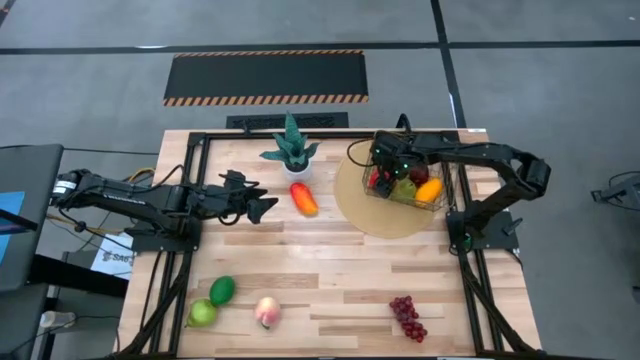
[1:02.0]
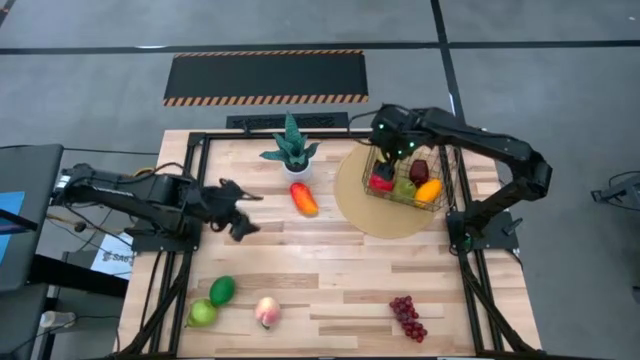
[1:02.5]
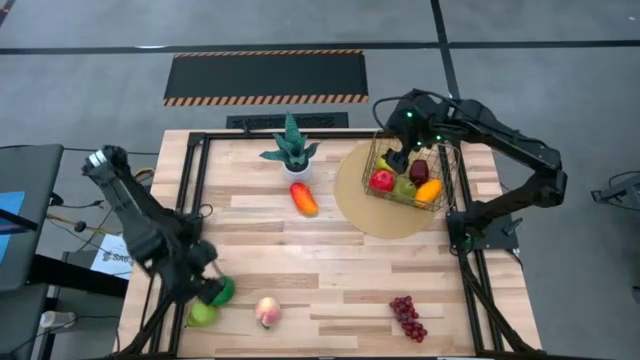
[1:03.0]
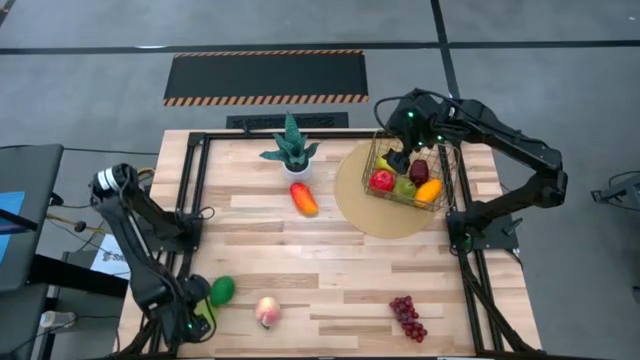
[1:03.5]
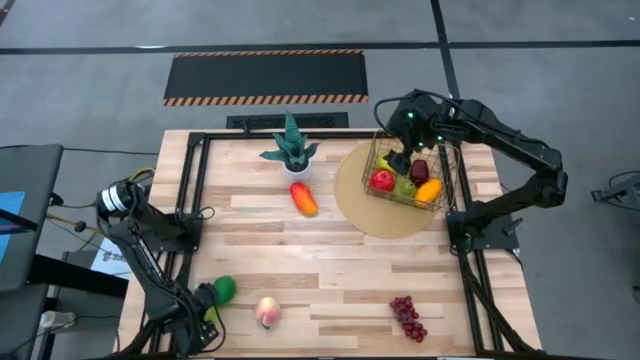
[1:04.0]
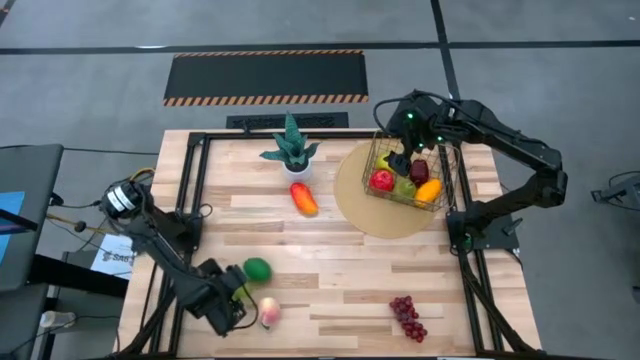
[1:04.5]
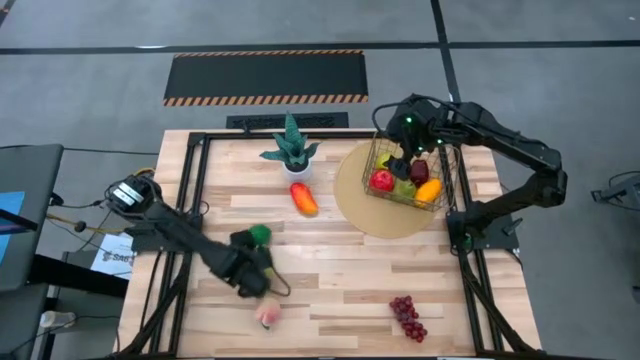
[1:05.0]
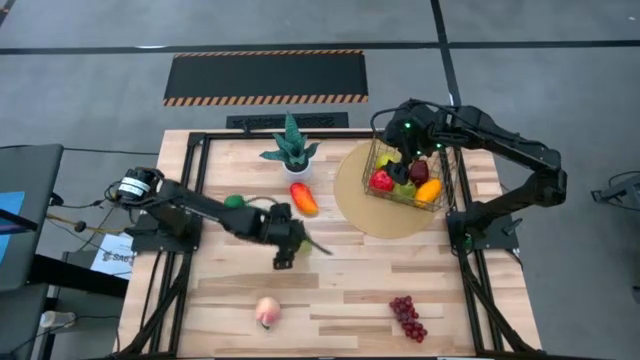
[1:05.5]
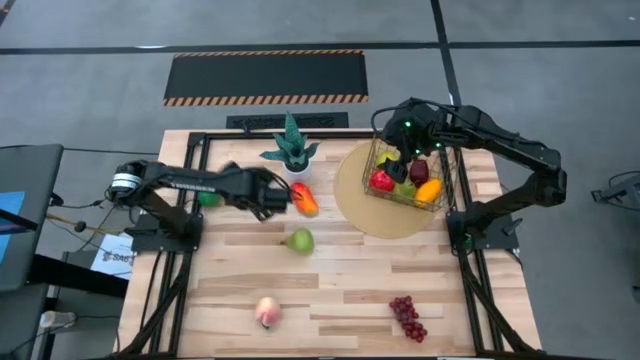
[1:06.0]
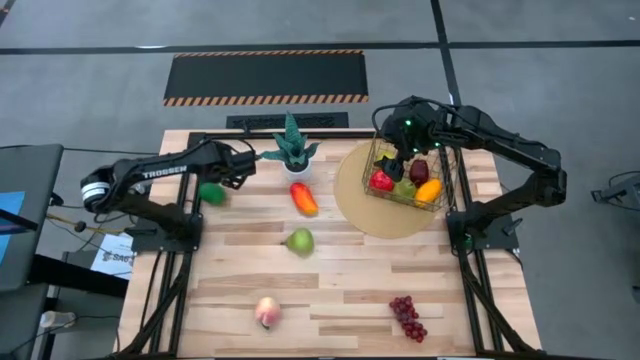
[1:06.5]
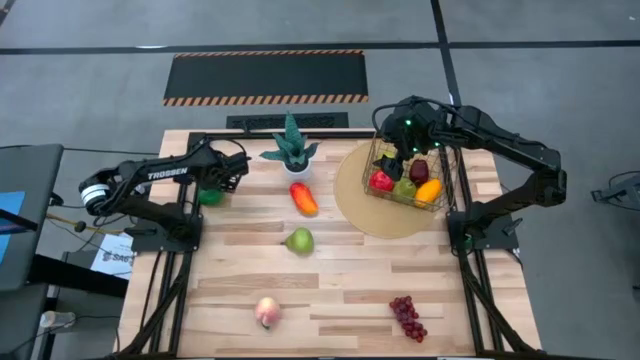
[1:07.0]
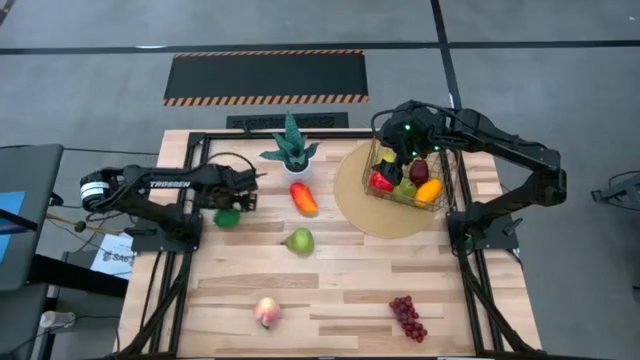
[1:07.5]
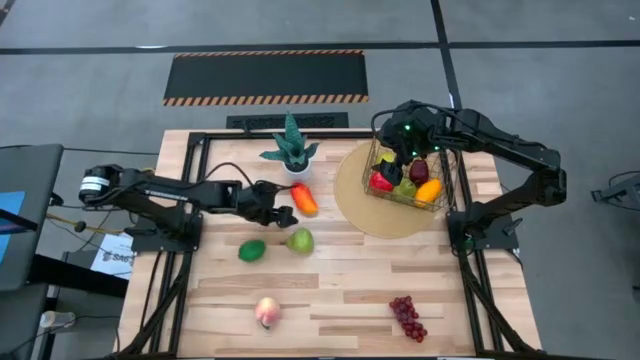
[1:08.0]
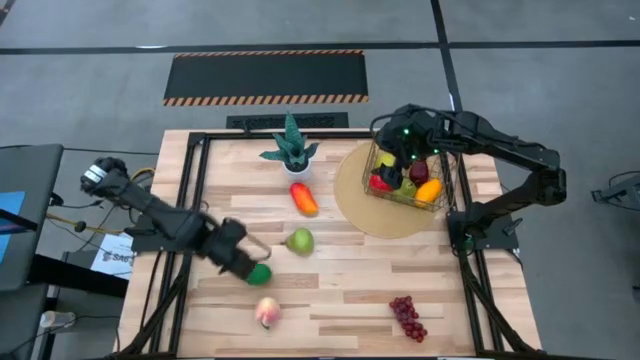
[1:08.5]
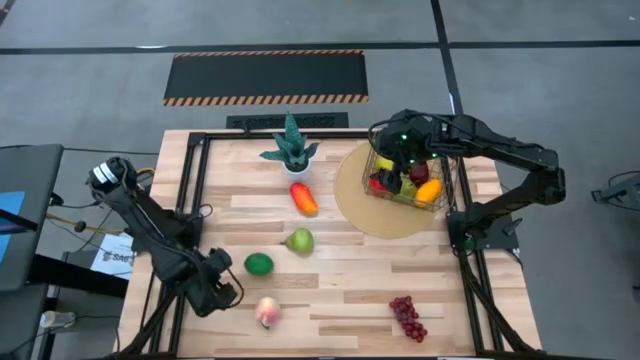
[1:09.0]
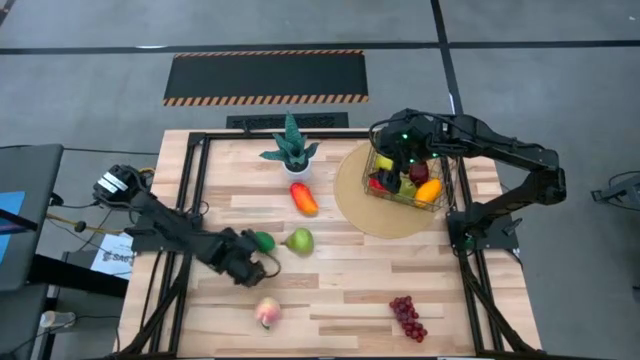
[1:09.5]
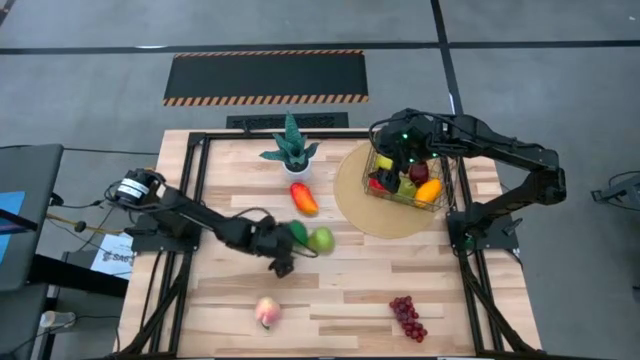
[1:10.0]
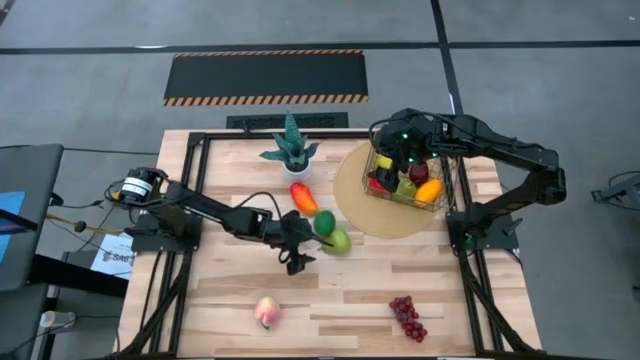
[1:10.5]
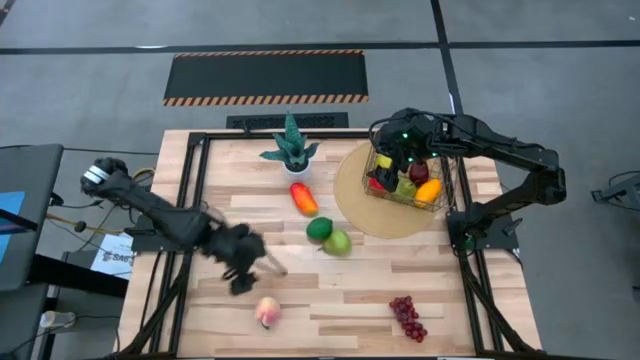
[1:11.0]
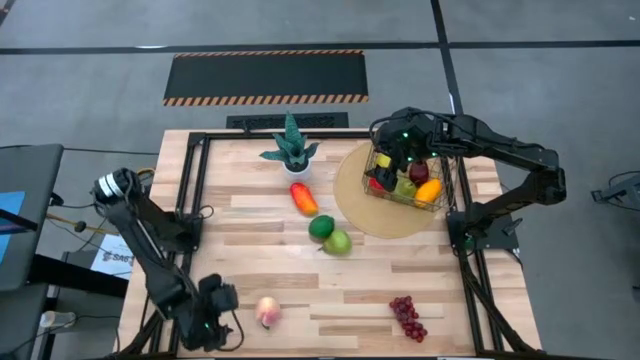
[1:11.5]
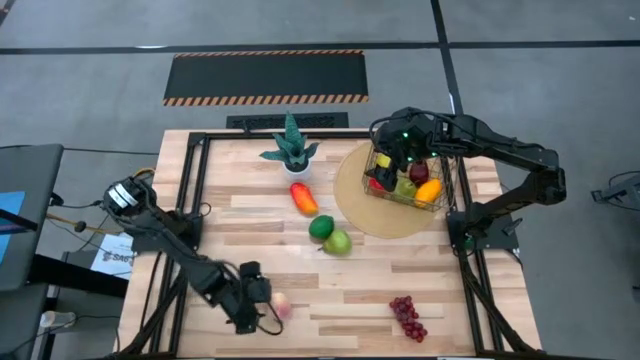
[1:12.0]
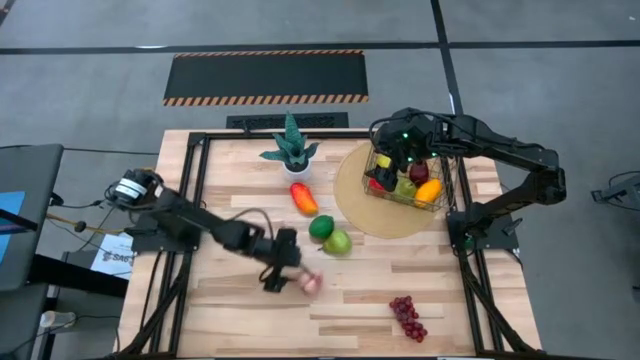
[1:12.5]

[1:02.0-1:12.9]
Task: Build produce basket
Move the fruits to the center of the table

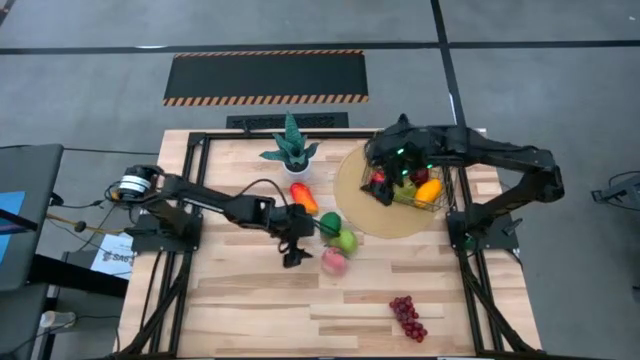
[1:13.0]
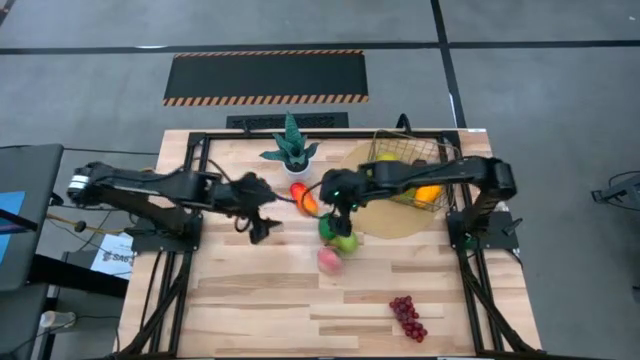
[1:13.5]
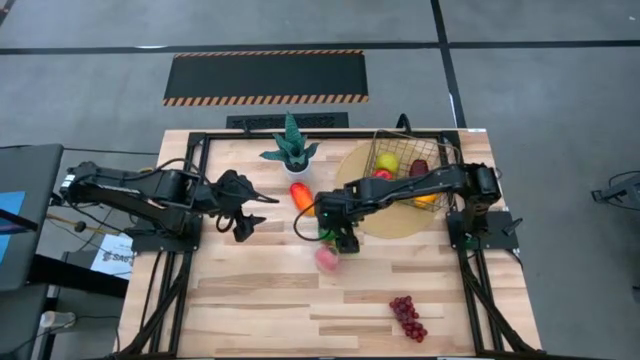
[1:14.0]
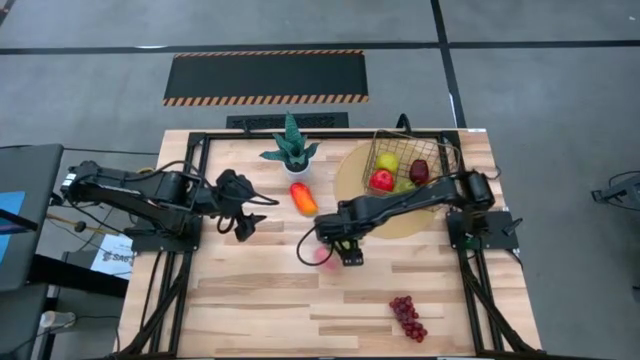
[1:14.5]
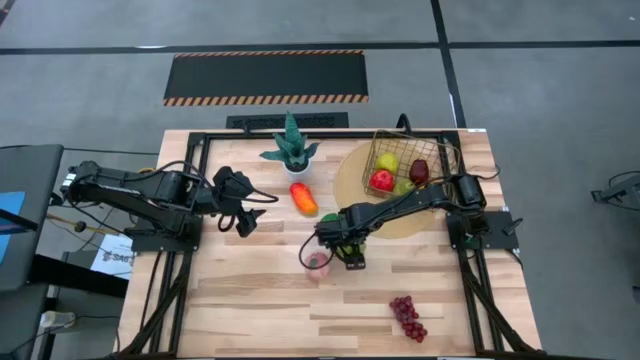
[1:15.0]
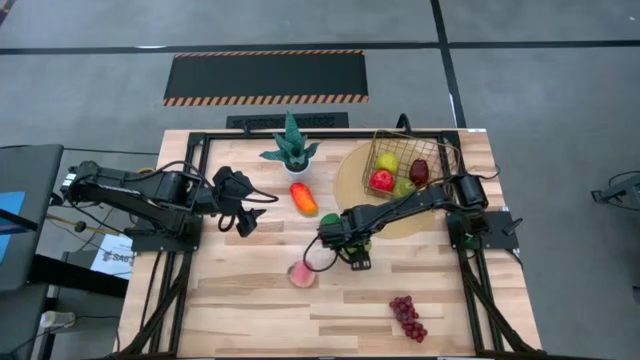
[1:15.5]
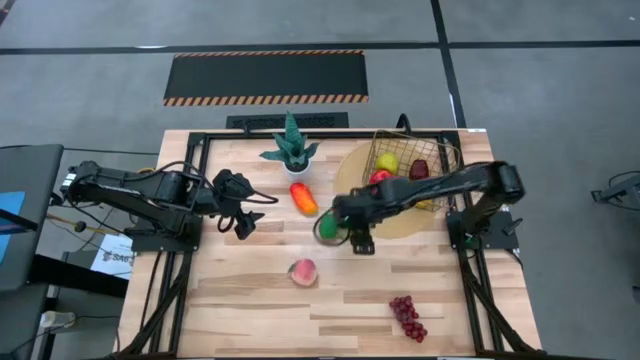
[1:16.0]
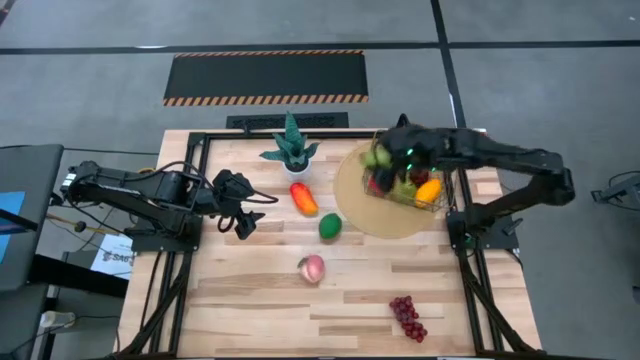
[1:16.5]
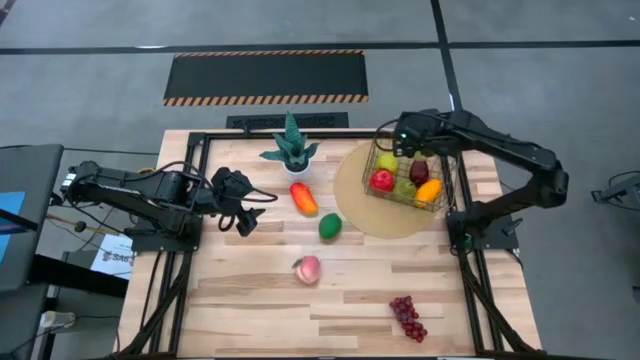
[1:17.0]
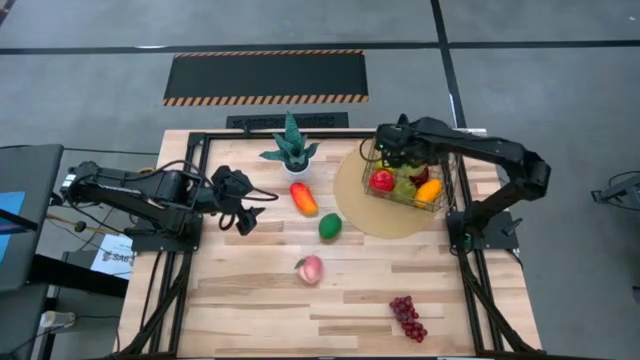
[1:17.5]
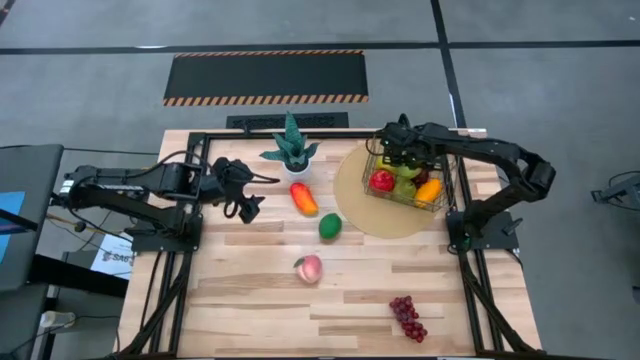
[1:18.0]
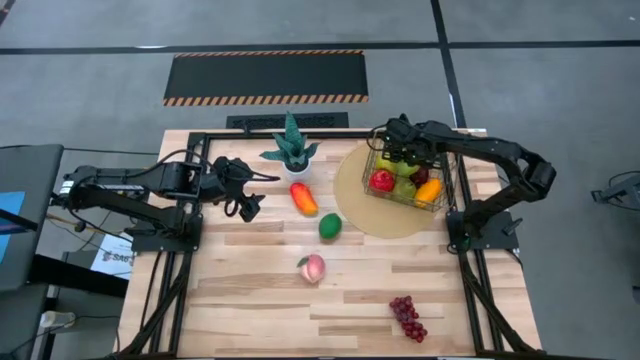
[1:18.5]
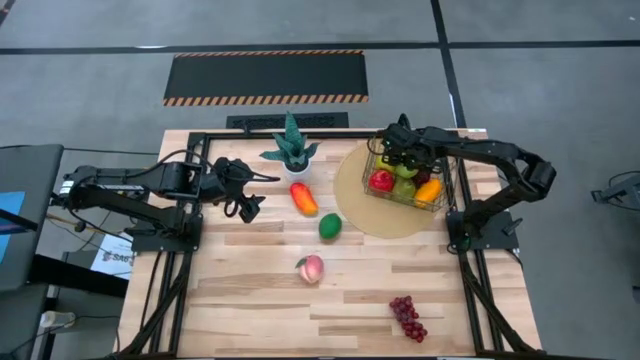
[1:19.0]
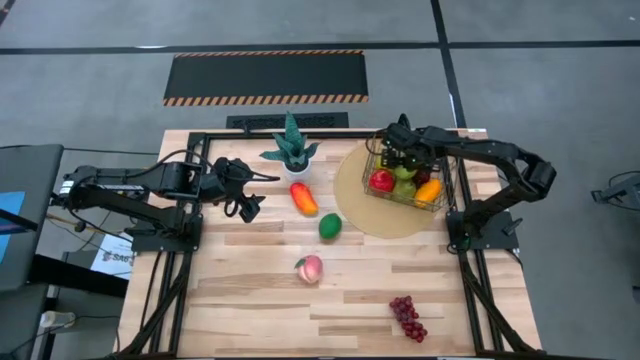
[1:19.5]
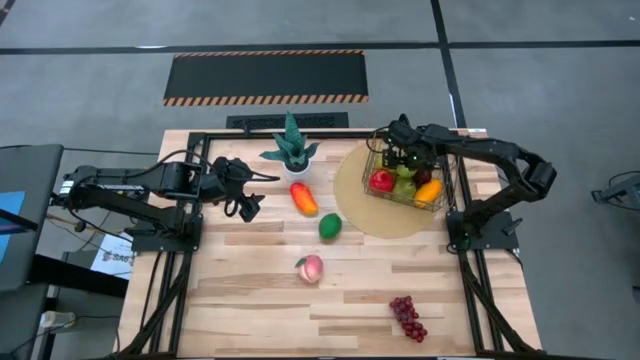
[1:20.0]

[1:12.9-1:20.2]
Put the pear into the wire basket

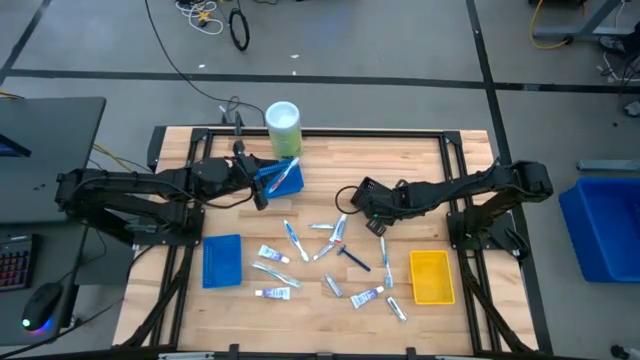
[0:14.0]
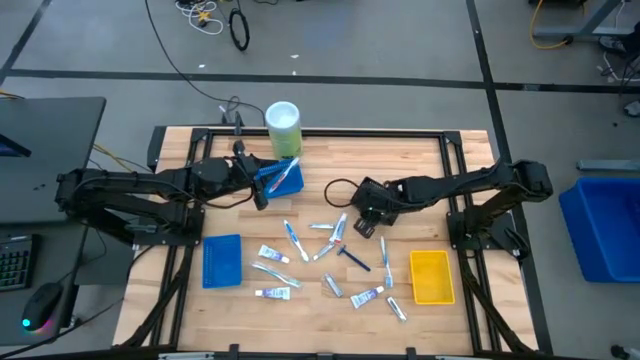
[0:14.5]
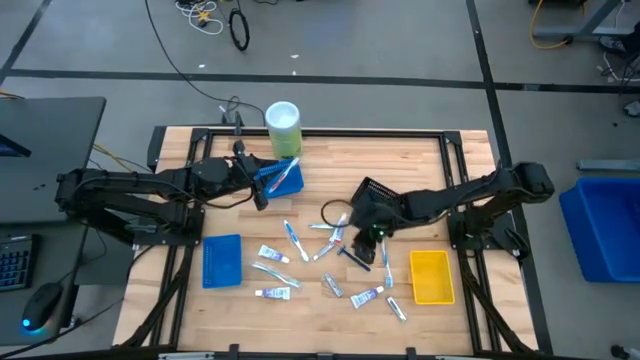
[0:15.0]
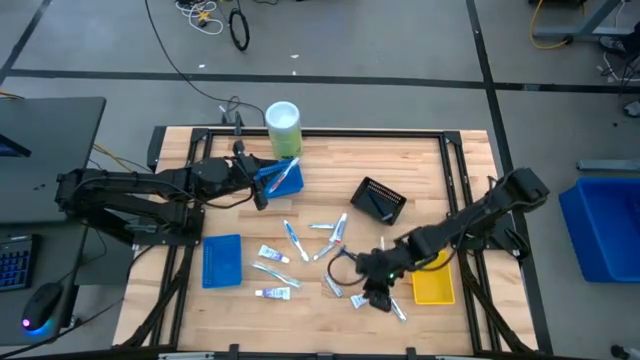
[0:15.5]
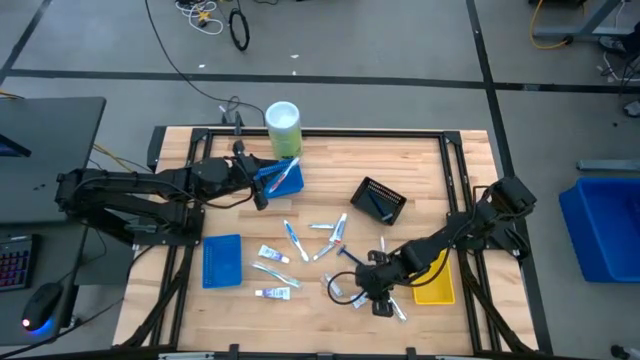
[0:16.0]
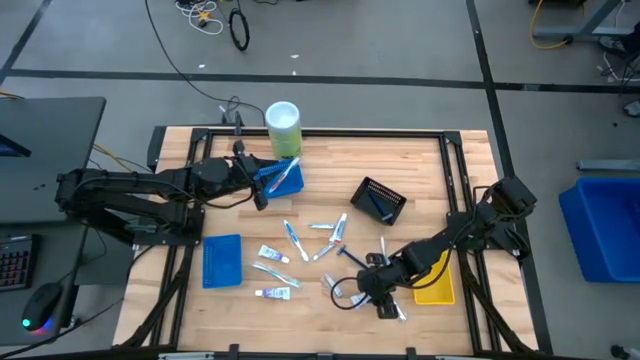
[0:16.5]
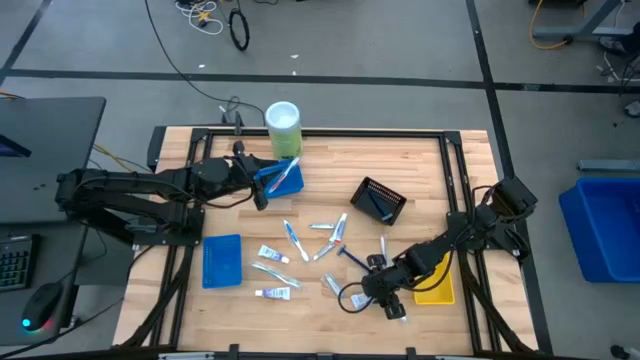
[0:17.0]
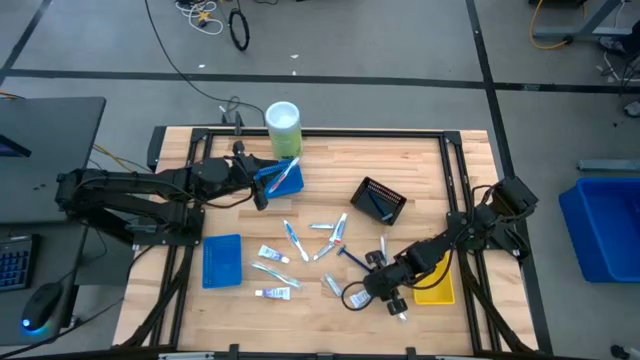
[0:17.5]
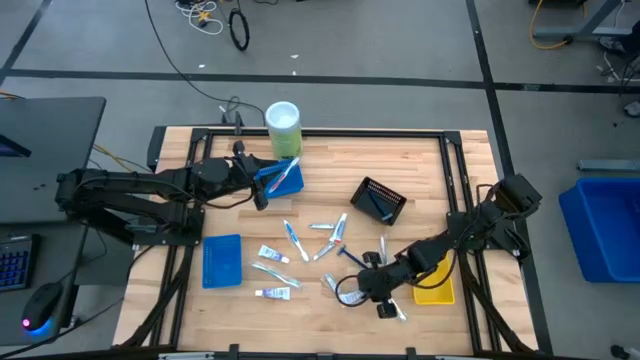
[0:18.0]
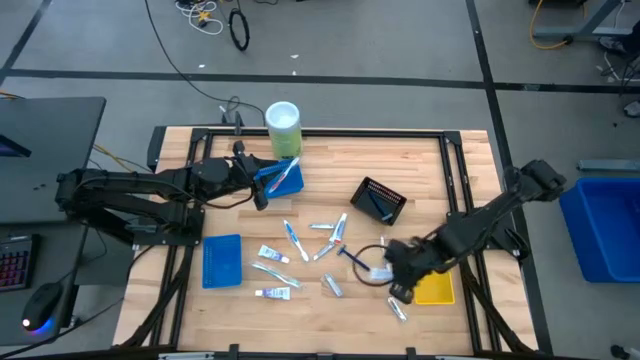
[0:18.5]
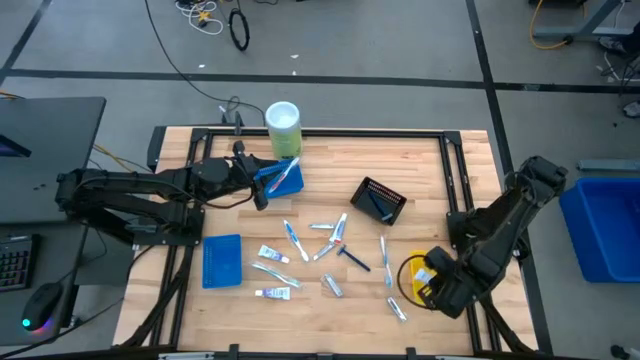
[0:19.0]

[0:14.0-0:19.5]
Task: Pick & Place Travel size toiletries
Put the white toothpaste into the yellow bin
